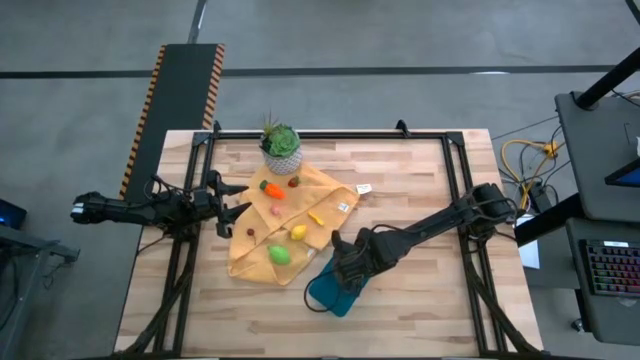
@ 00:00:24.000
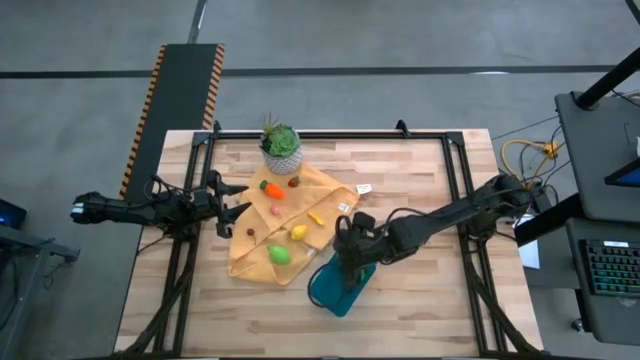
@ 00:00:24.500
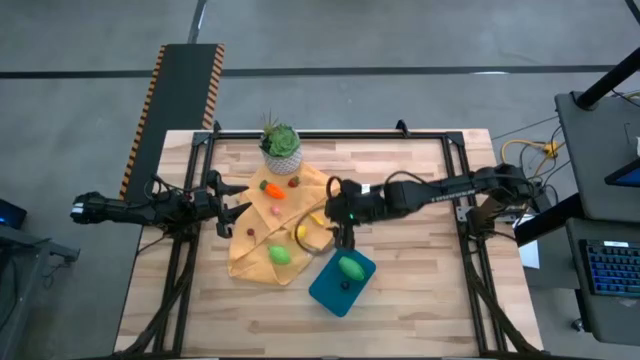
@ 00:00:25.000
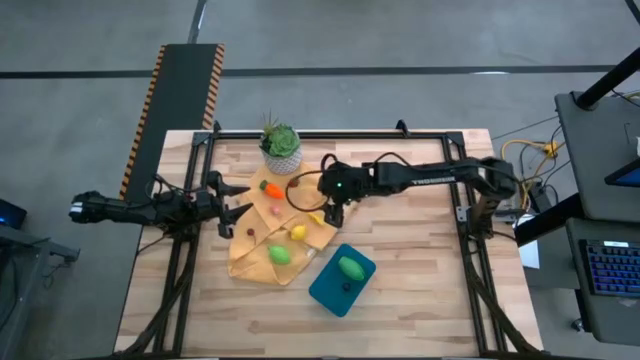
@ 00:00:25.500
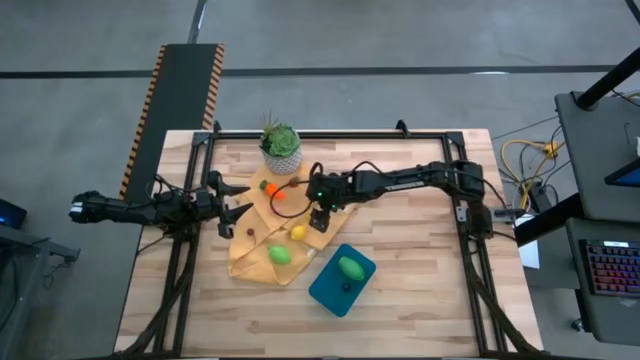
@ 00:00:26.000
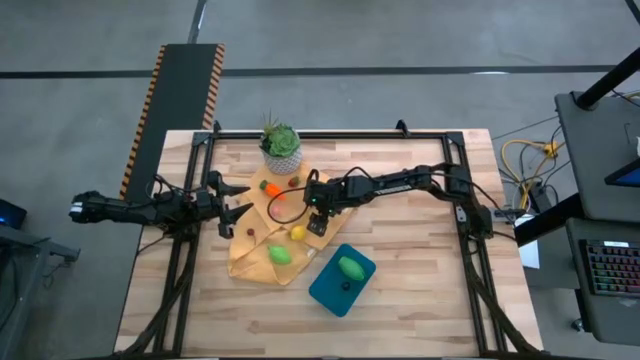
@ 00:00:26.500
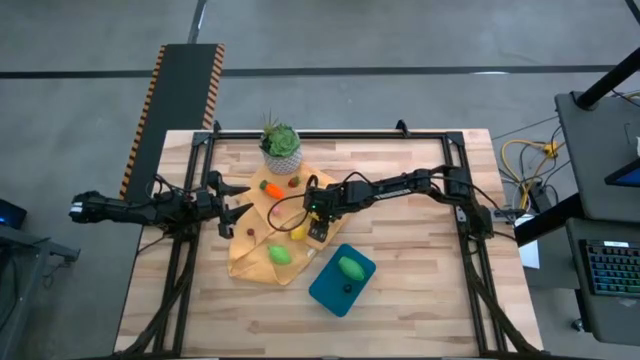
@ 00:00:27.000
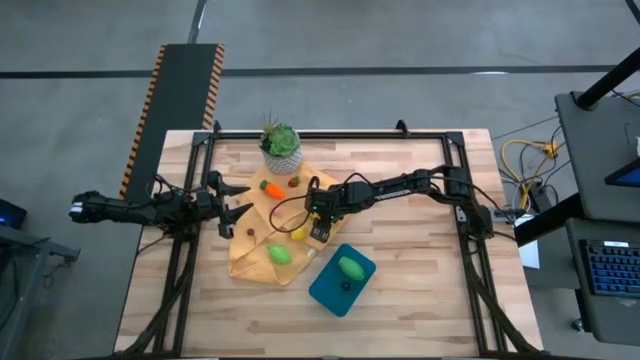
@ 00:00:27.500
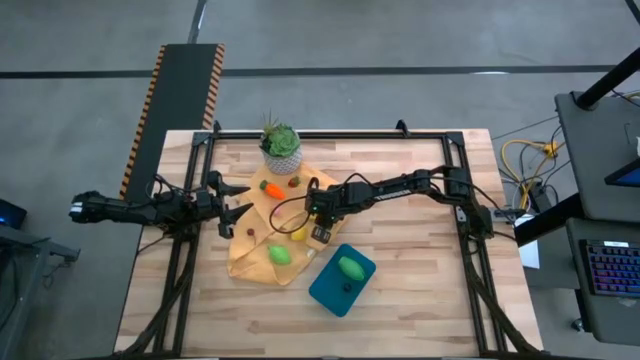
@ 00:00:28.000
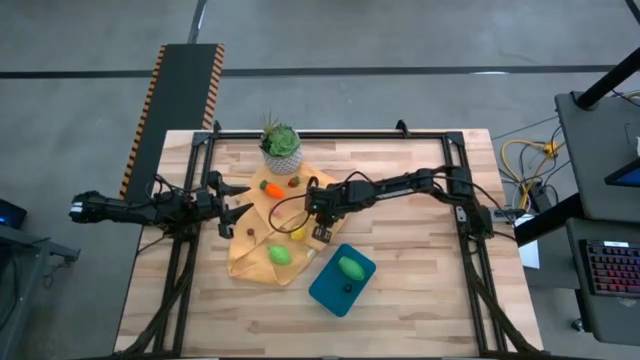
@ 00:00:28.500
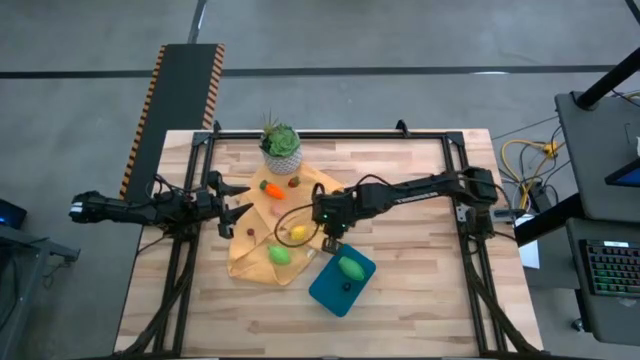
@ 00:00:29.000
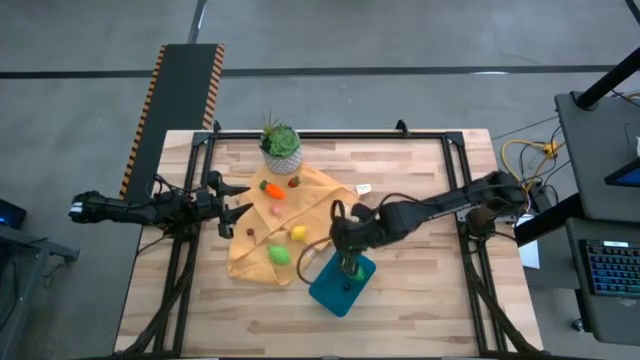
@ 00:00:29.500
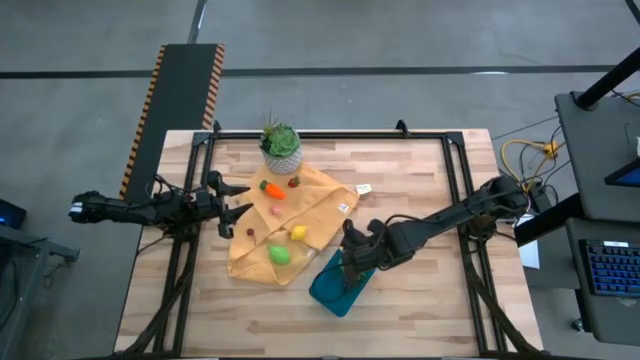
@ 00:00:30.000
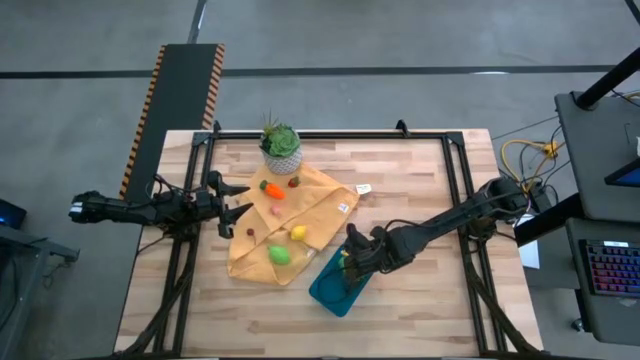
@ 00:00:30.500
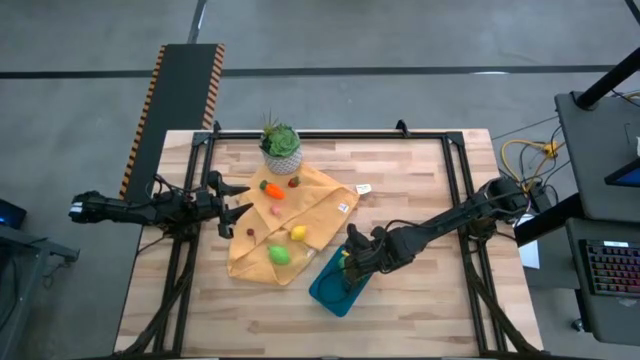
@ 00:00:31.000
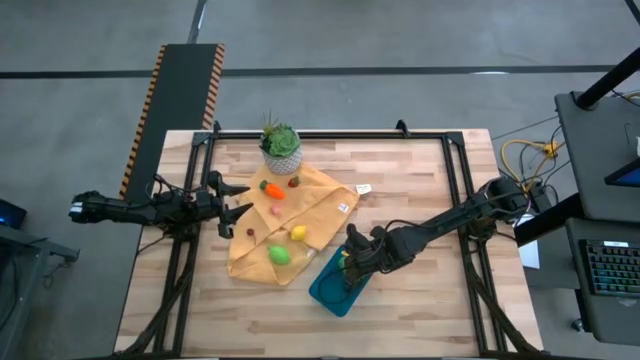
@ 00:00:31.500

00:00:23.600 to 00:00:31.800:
Task: Pick and placing Produce into tupperware
Put the yellow corn into the blue bin

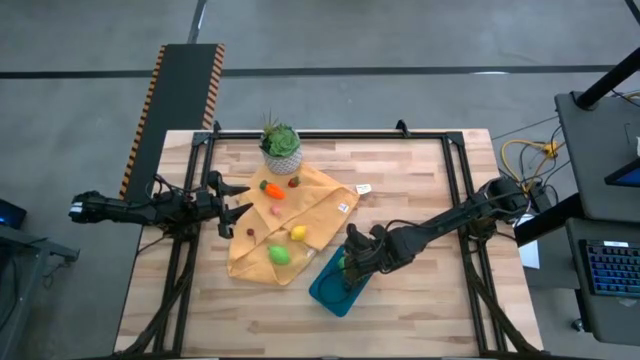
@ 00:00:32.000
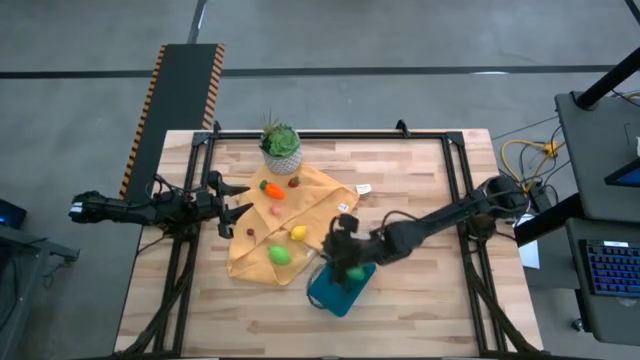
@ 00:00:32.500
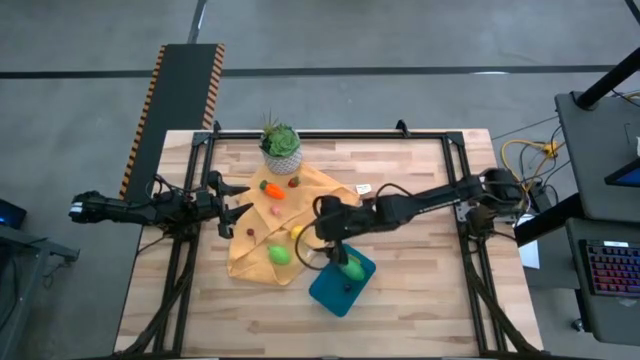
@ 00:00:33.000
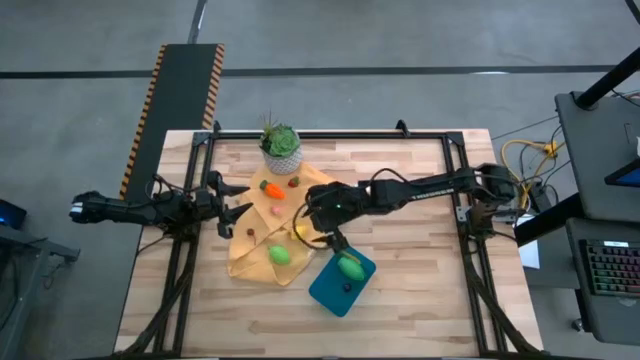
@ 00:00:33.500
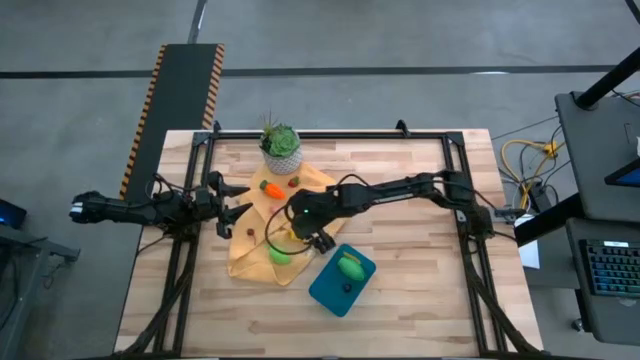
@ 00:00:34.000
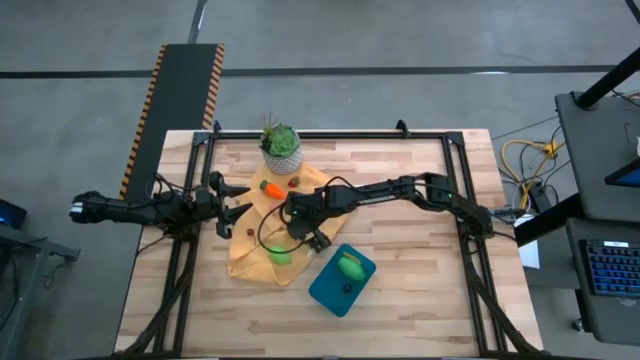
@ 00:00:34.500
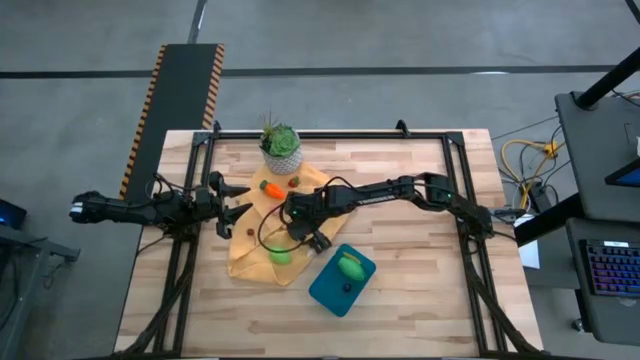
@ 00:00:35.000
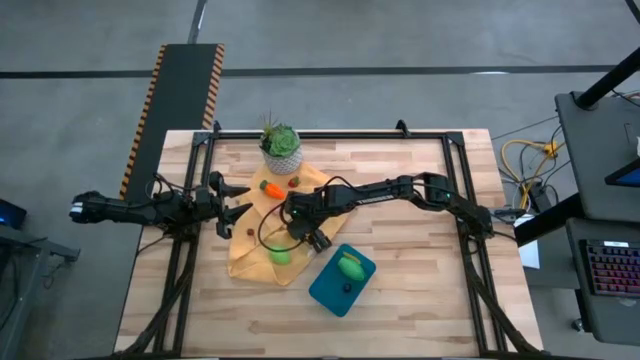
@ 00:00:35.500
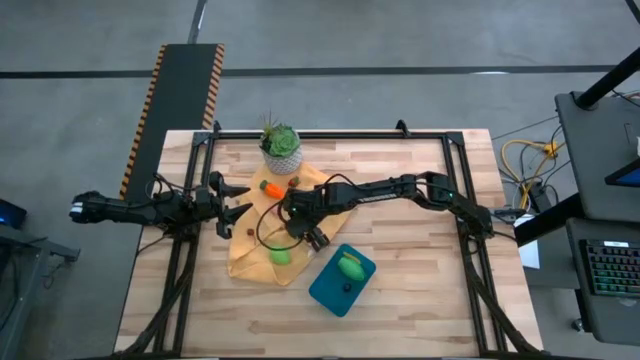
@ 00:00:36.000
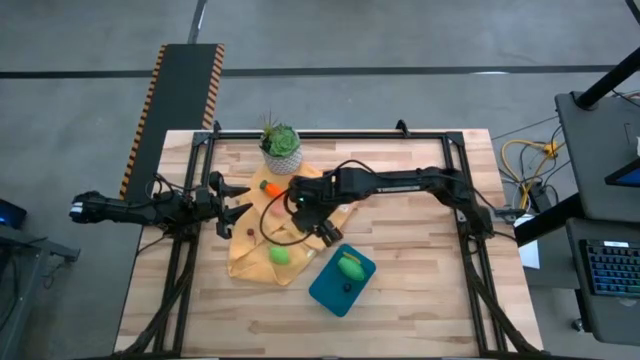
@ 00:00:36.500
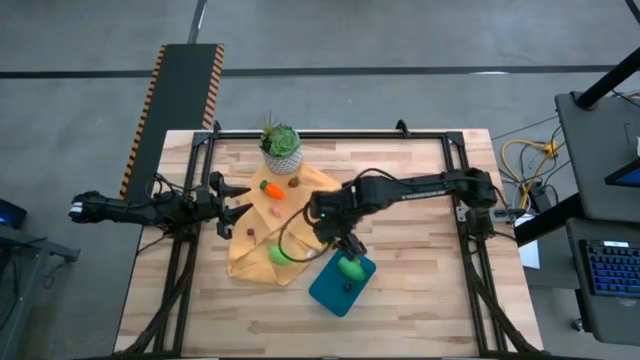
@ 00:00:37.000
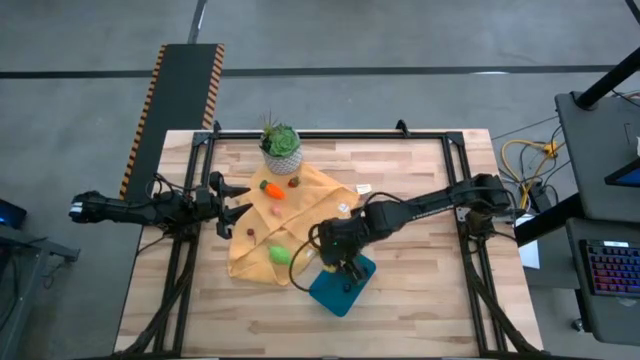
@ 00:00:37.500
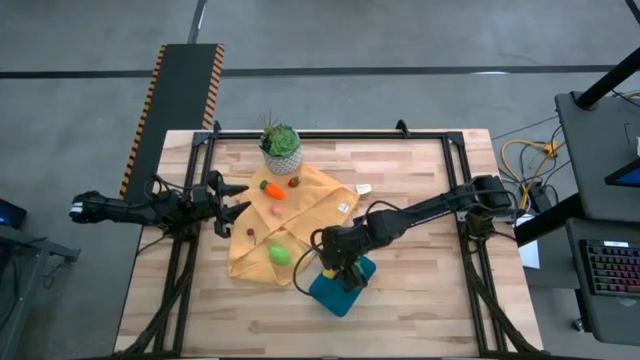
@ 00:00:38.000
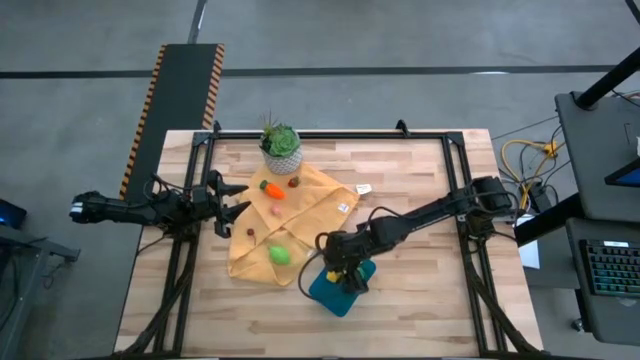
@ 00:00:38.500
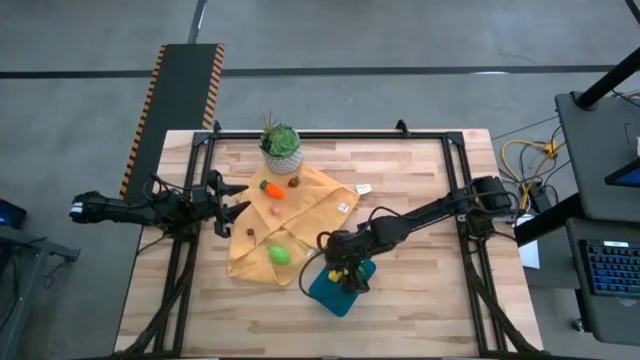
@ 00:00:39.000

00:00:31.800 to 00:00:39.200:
Put the yellow lemon into the blue bin

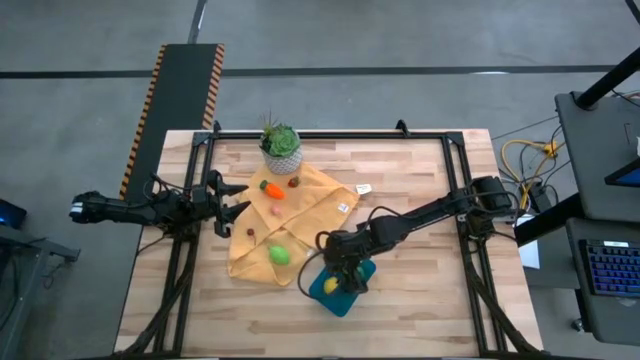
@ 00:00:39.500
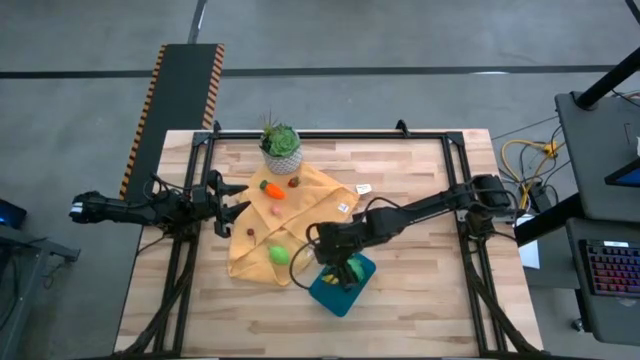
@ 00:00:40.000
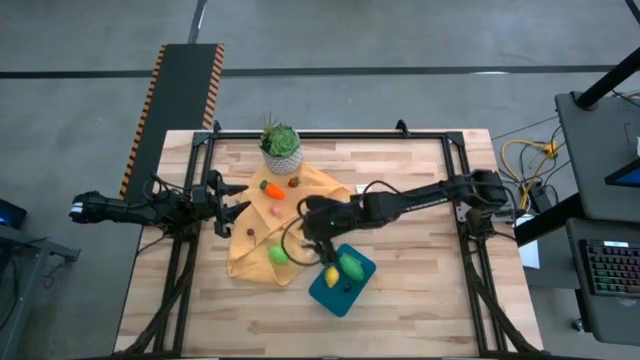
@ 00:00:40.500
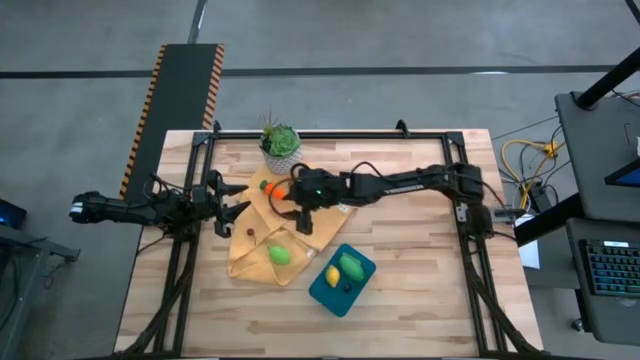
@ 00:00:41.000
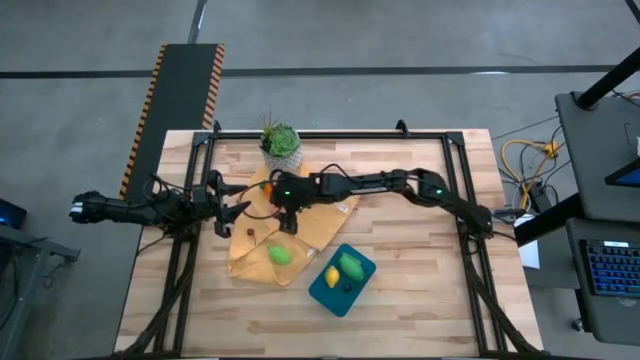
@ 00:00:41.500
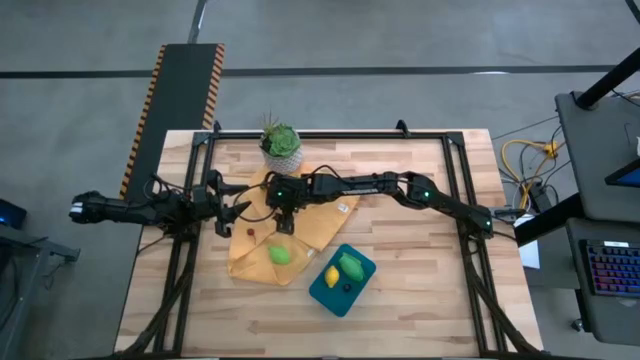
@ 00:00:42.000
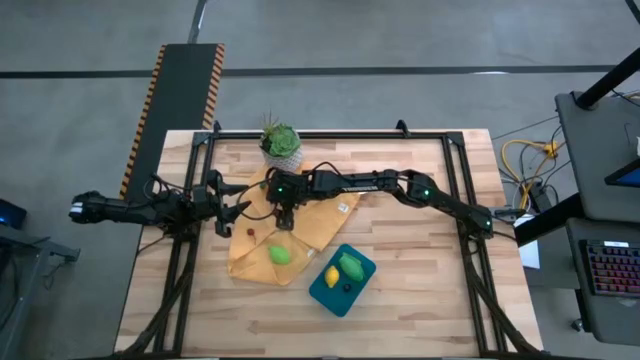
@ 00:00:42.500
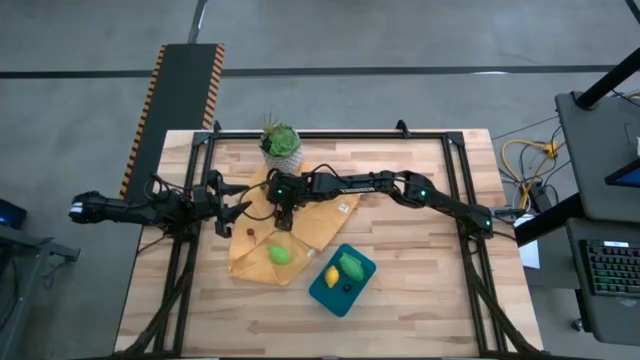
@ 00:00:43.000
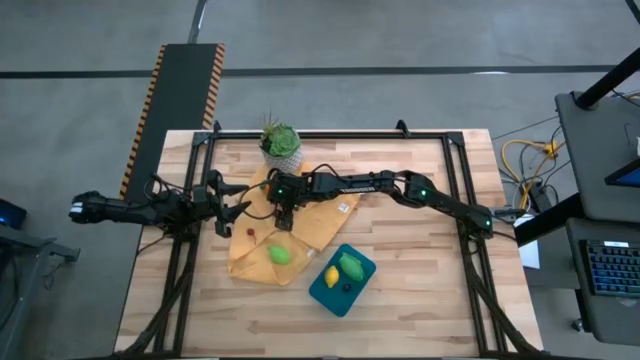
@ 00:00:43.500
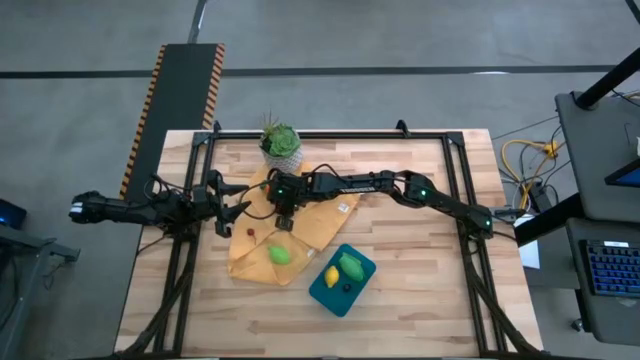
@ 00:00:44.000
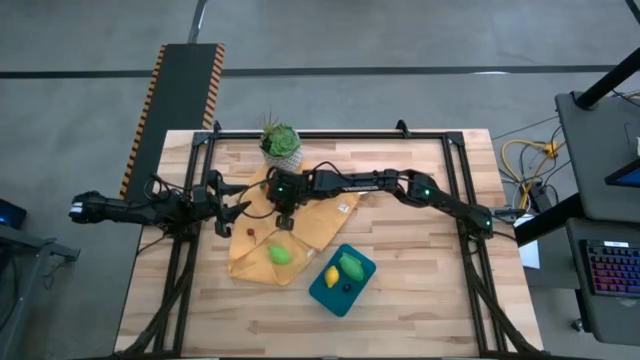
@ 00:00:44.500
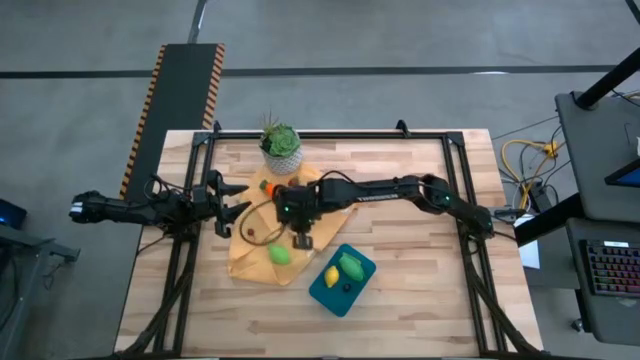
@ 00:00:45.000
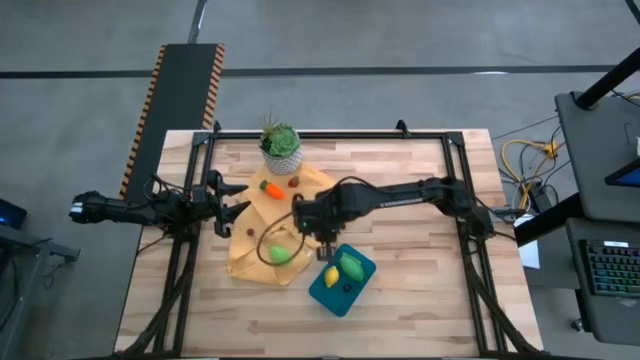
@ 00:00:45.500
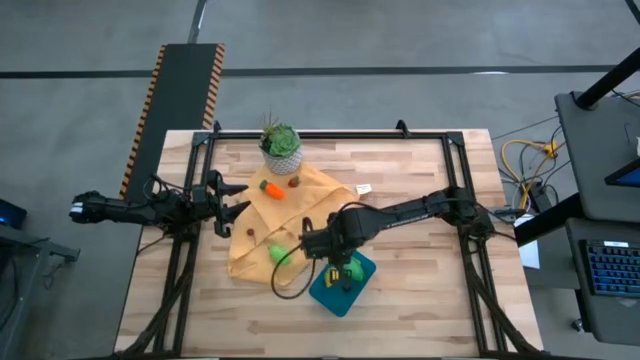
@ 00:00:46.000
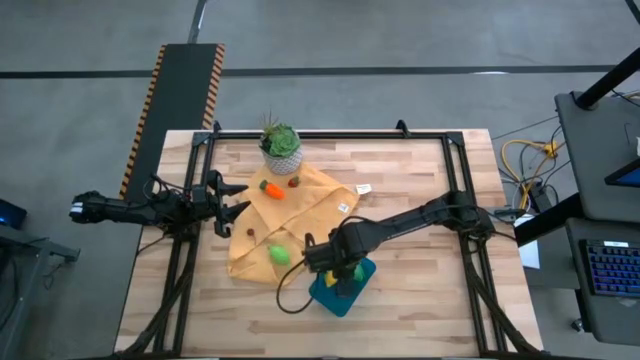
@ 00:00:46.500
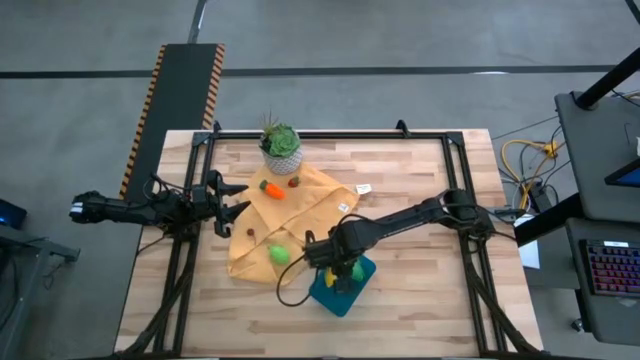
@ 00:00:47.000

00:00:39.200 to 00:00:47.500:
Put the pink peach into the blue bin
